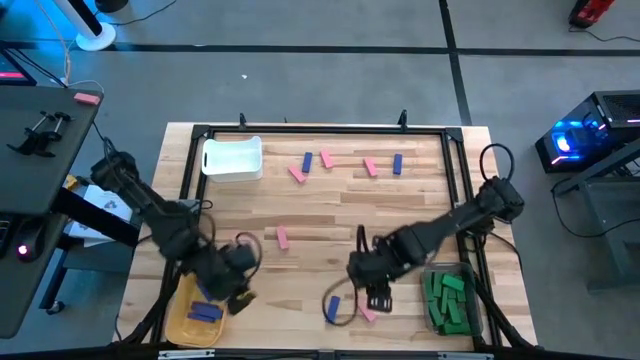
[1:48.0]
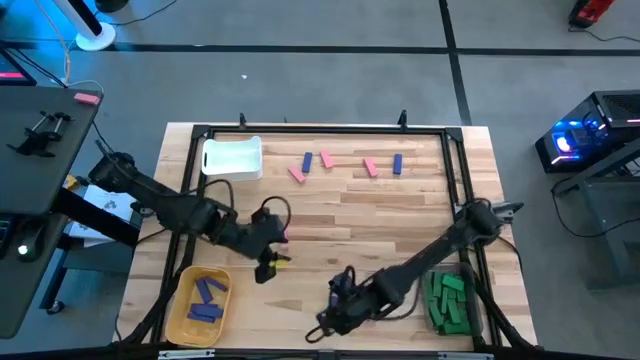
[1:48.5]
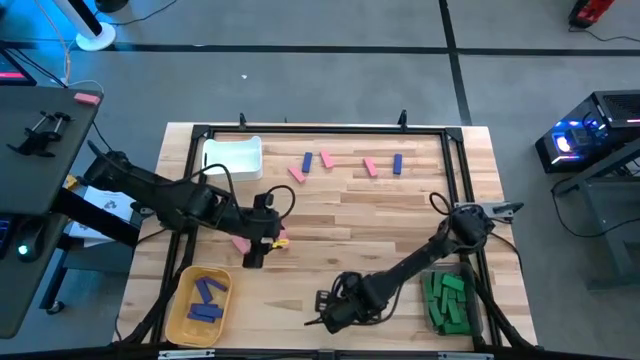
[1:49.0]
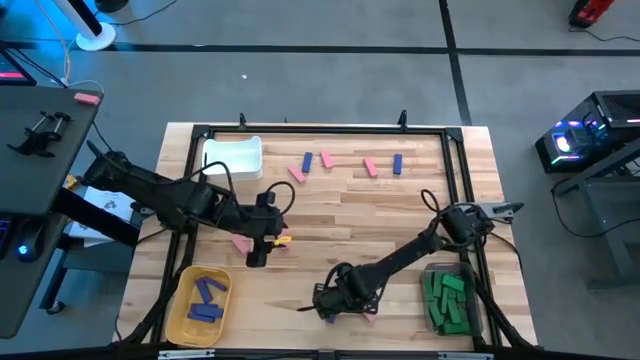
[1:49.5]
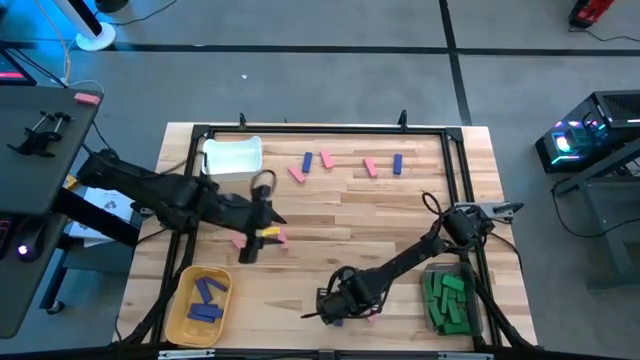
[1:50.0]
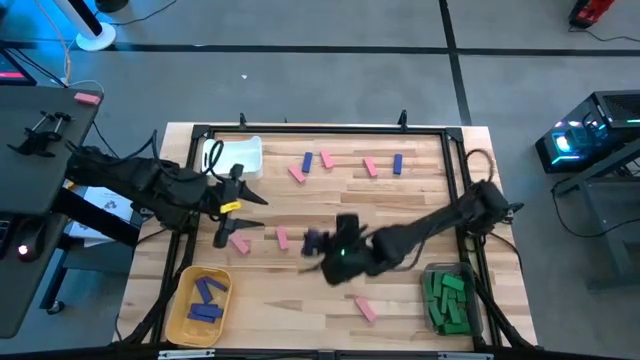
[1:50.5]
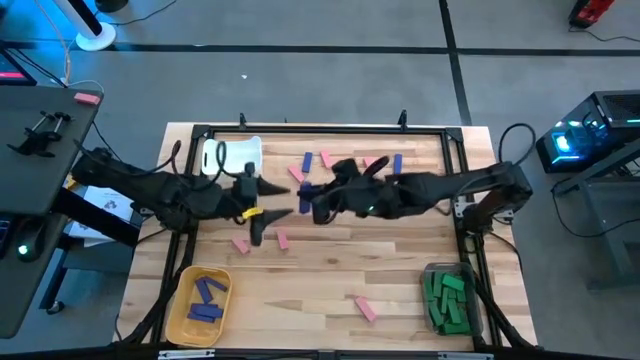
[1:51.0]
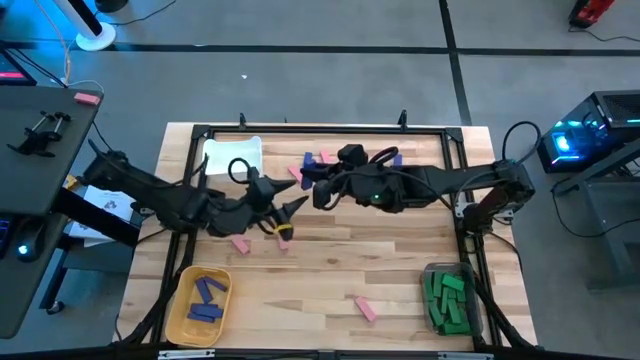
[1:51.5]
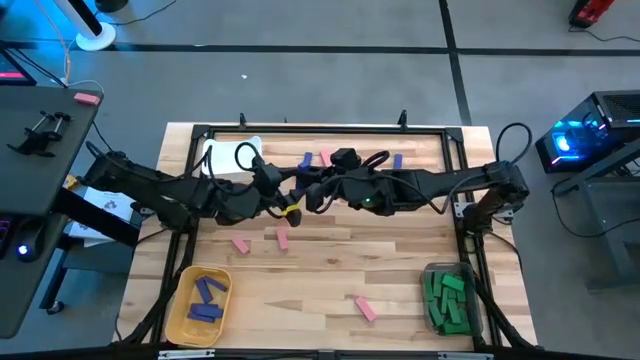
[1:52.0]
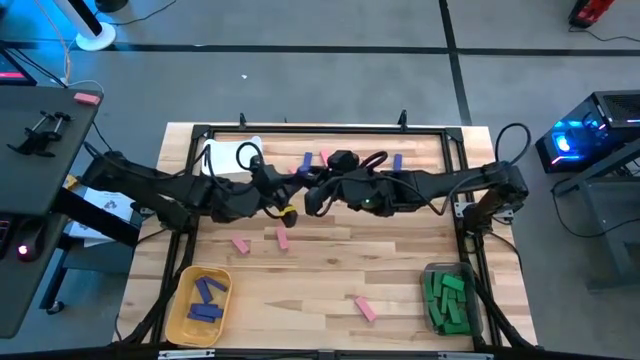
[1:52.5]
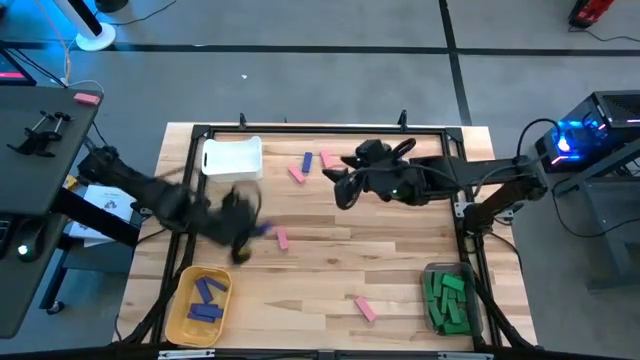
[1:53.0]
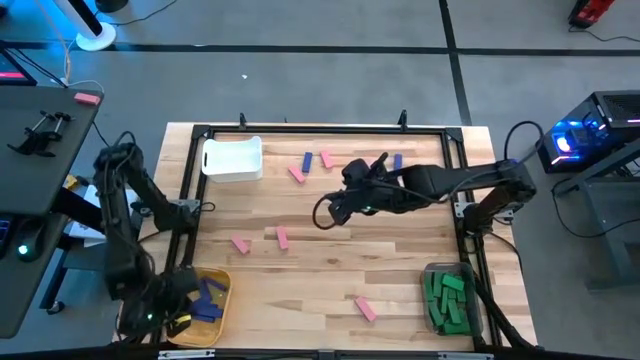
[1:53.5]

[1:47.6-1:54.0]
Task: Sort blocks
Put the purple block into the yellow bin

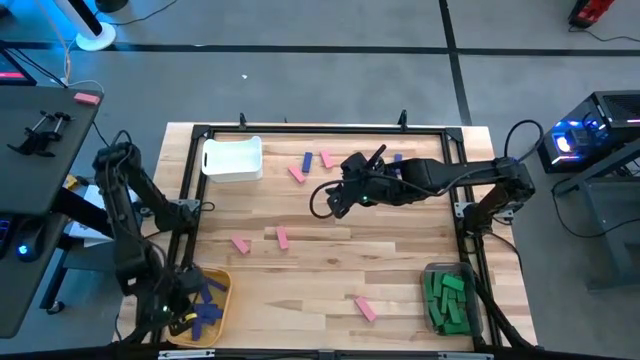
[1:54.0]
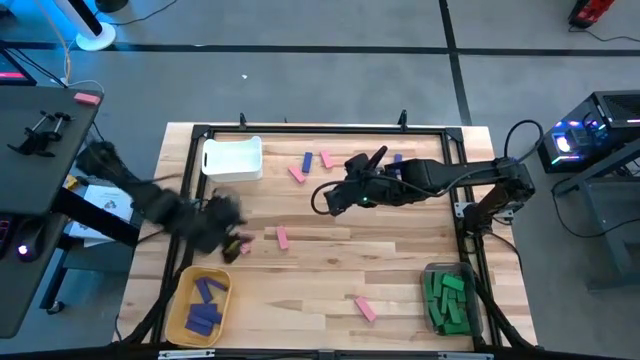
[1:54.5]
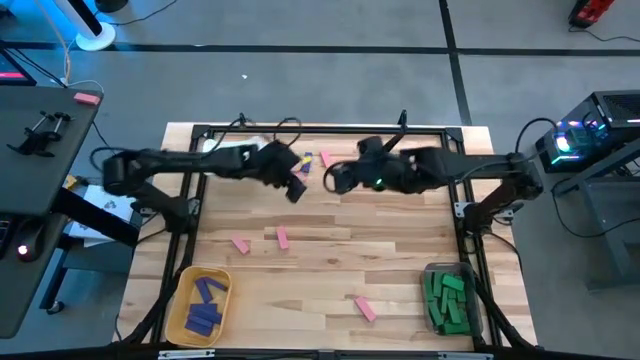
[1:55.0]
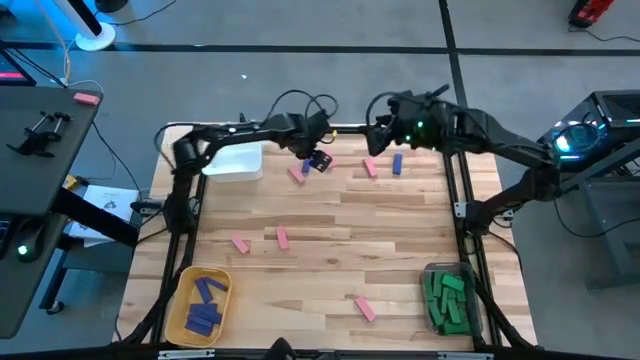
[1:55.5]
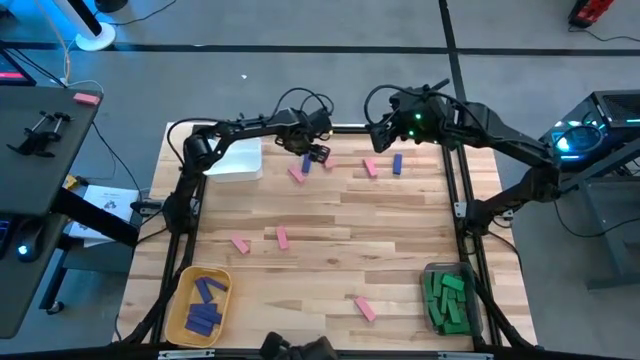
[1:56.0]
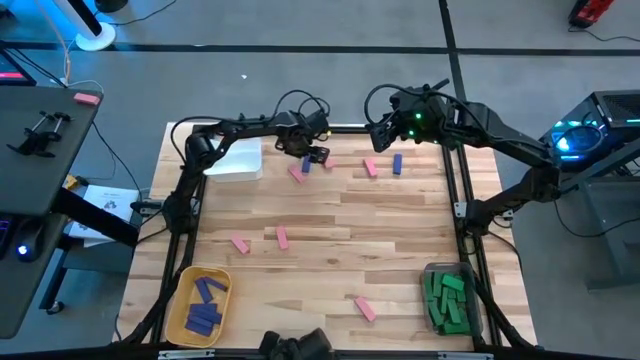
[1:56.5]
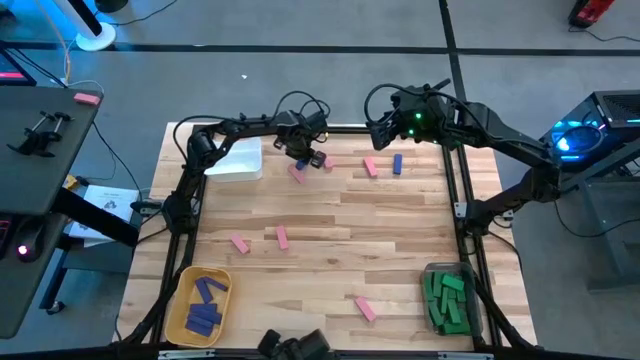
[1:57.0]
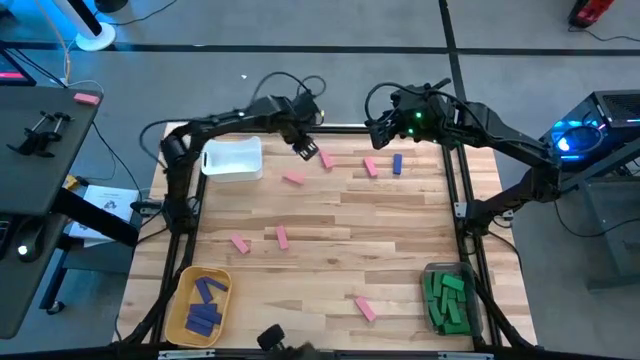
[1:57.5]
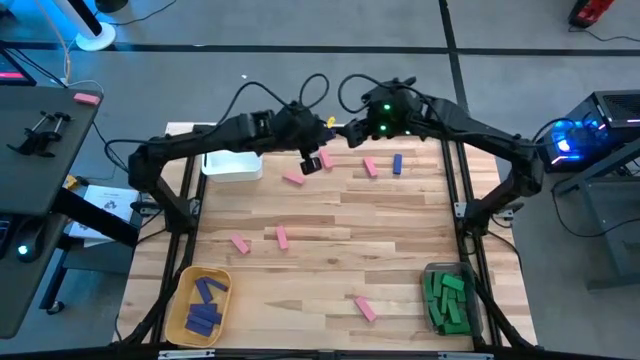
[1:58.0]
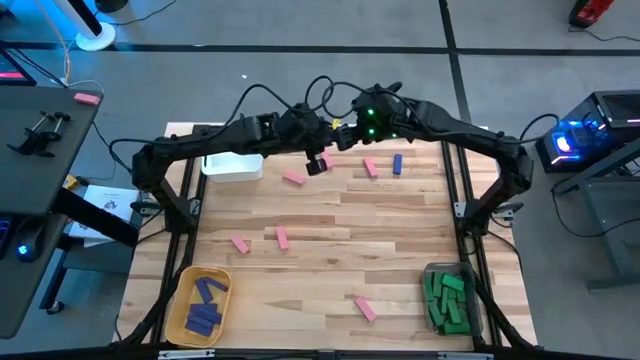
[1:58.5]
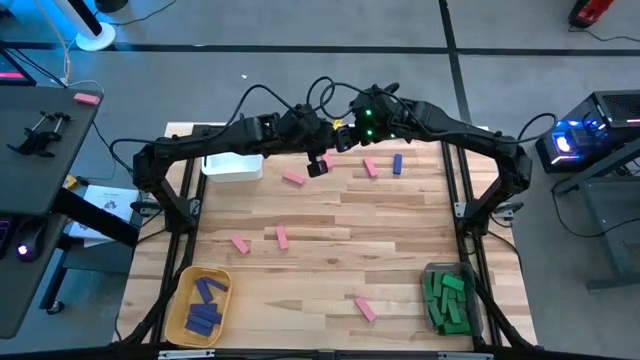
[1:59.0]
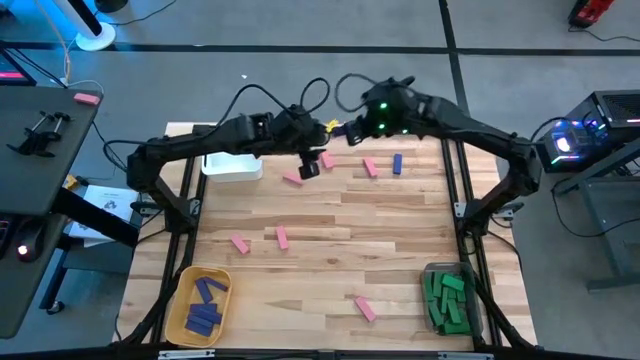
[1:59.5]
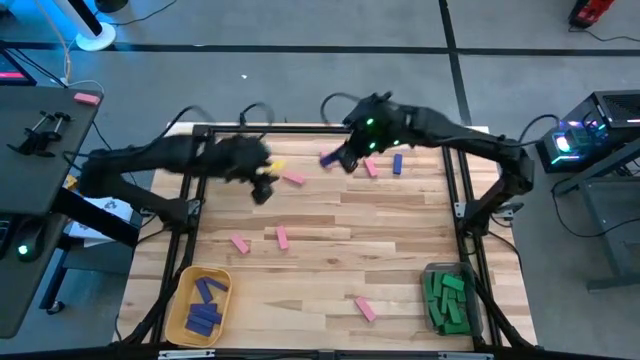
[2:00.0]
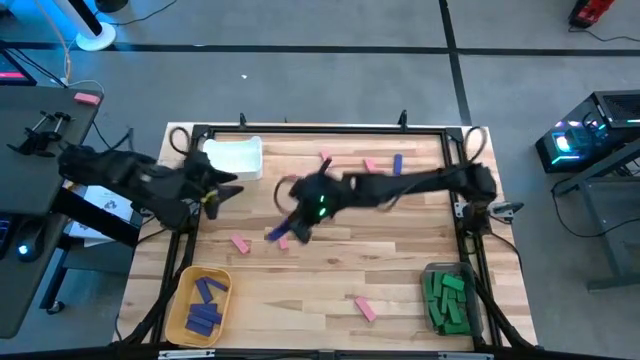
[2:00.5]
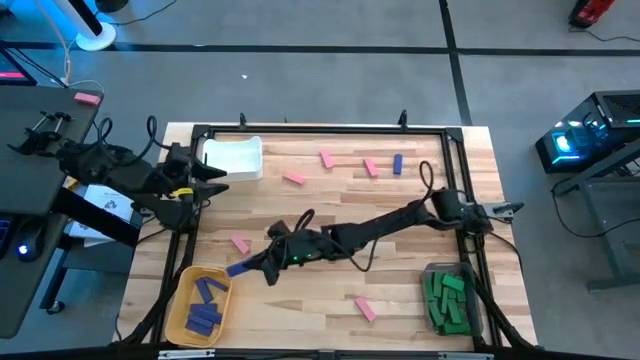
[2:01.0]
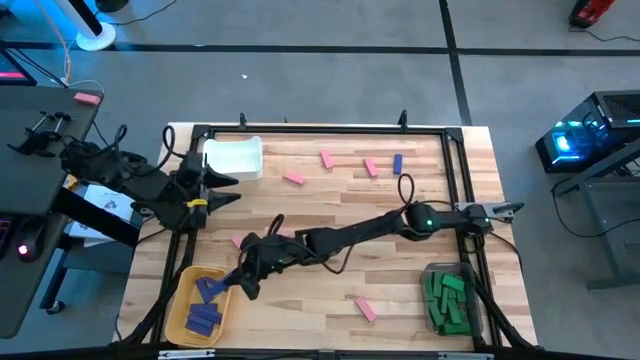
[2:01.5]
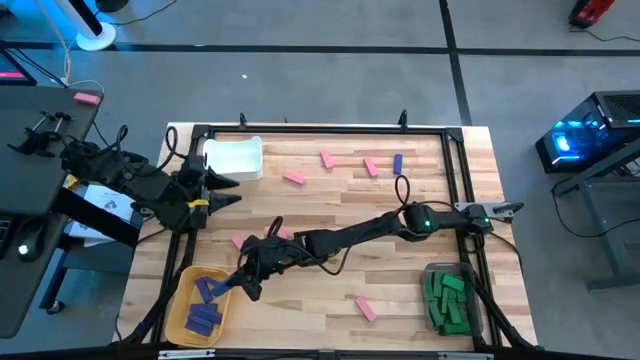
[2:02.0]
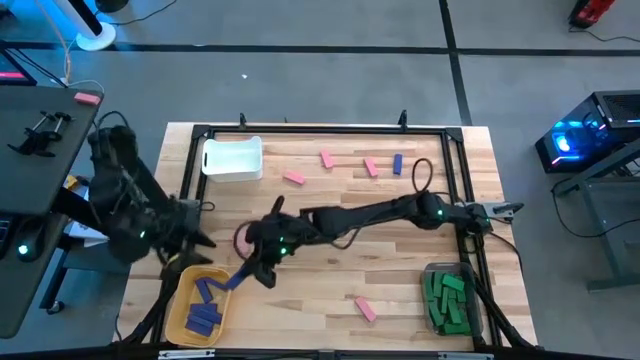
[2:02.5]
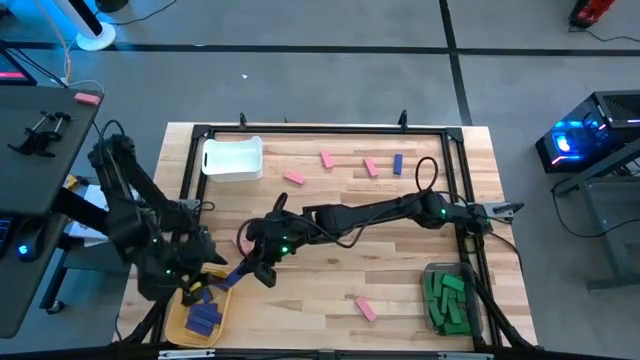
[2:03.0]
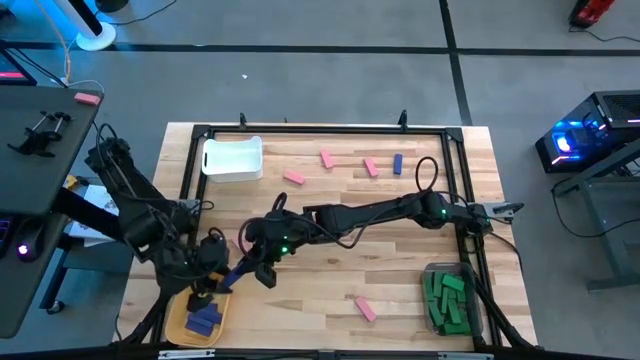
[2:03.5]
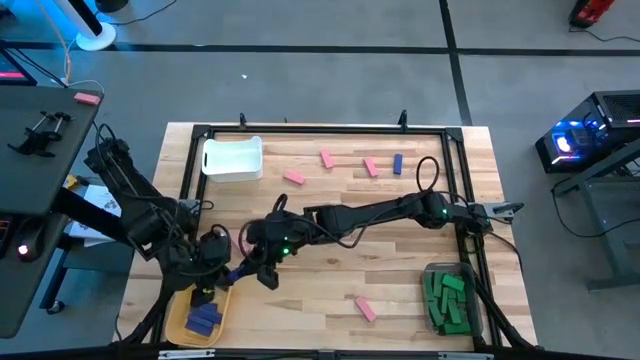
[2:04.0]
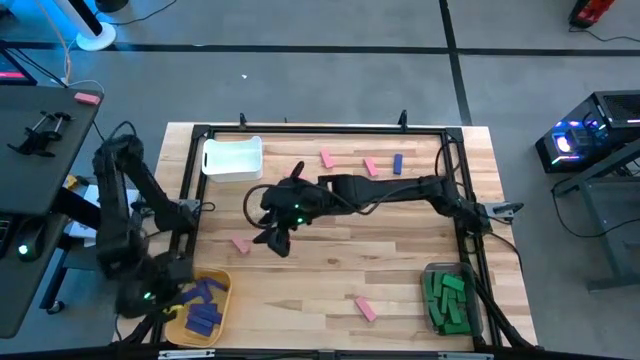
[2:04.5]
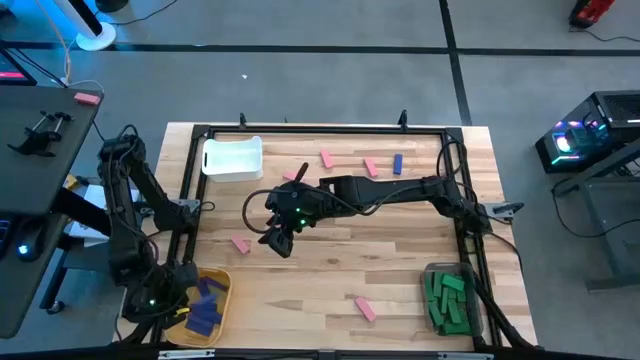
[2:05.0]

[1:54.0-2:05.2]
Put the purple block into the yellow bin

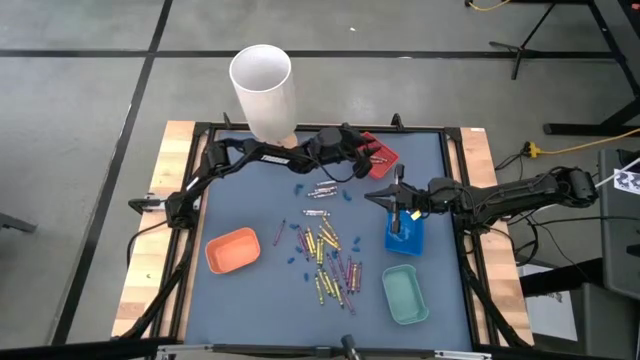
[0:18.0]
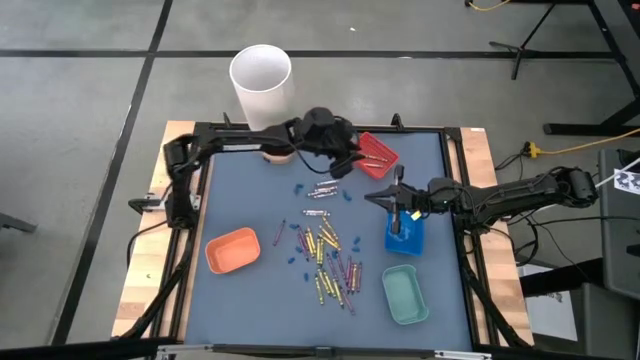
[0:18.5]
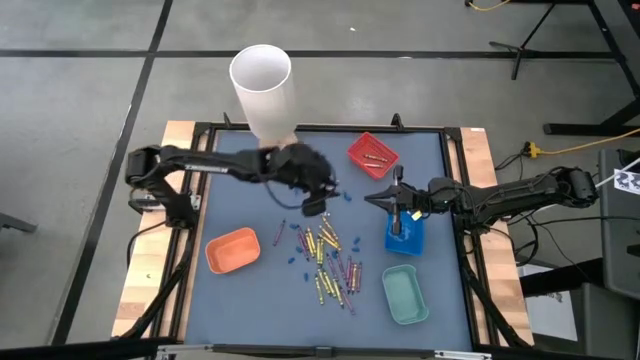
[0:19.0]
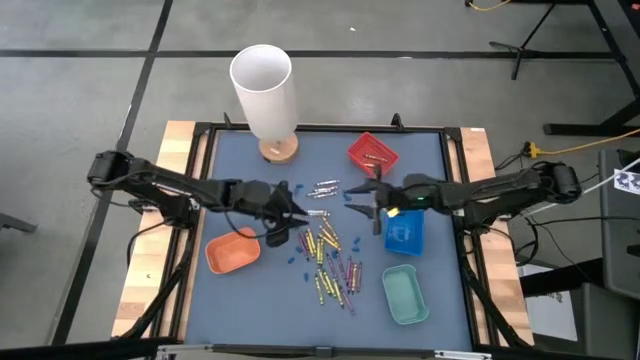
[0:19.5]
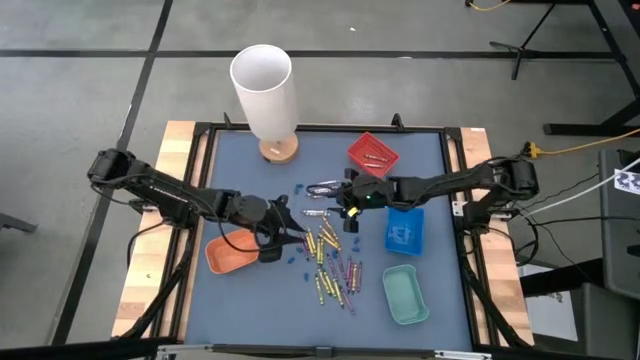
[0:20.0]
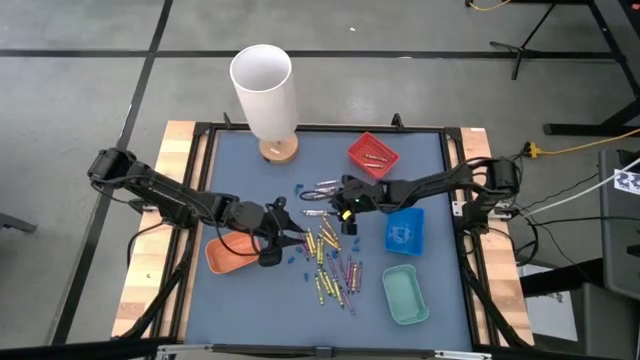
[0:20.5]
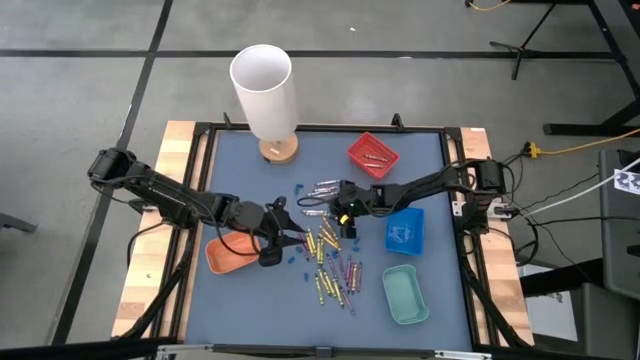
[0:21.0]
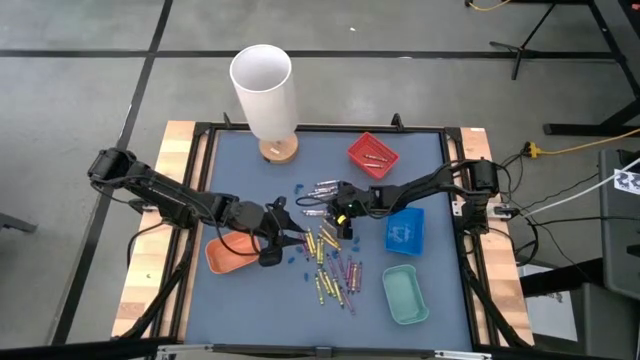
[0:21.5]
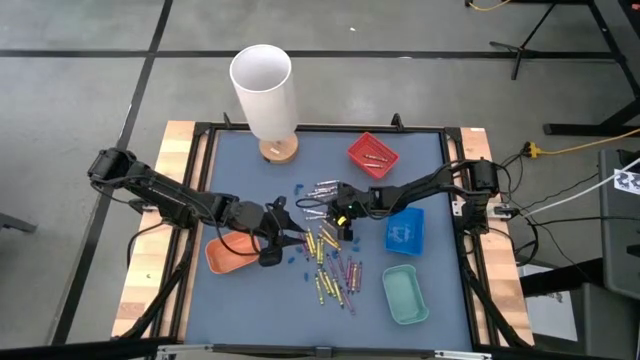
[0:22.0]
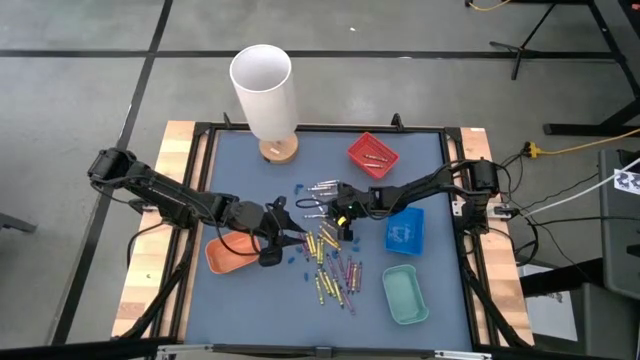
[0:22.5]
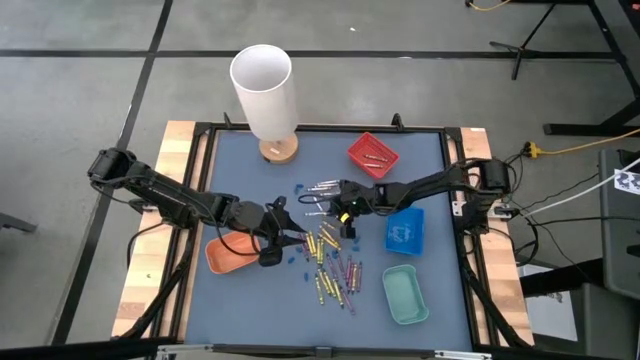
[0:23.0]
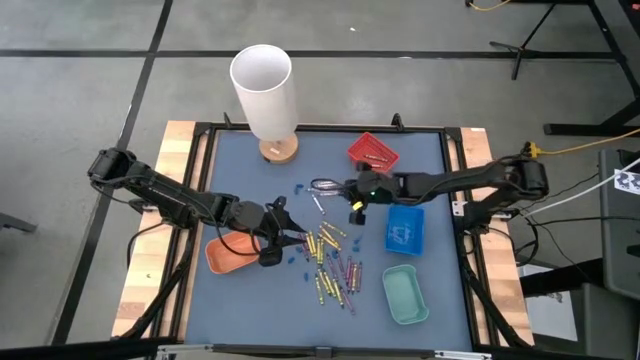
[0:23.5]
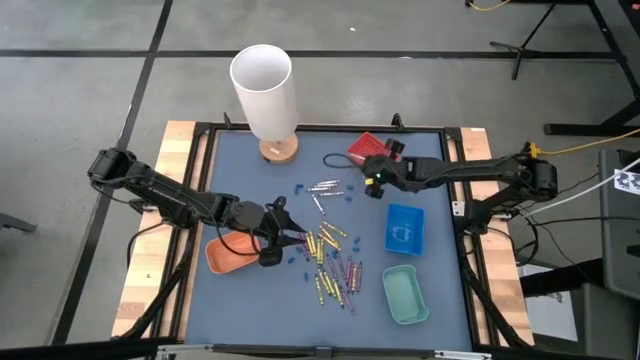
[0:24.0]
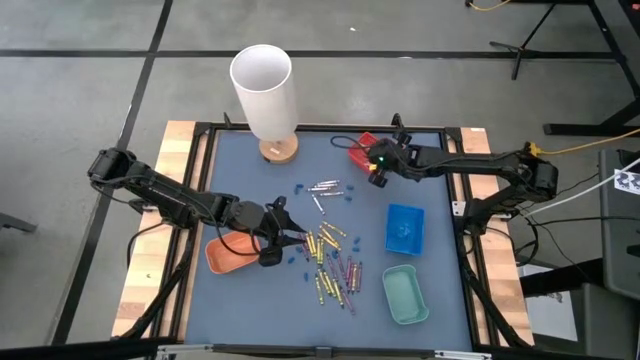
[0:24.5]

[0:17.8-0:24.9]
Task: Sort crayons
Put the grey crayon into the red bin
